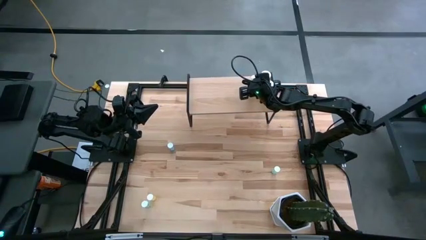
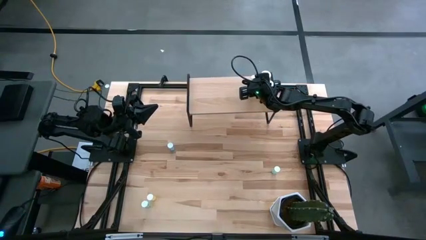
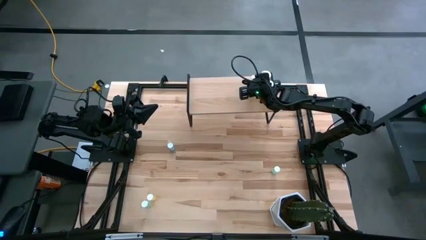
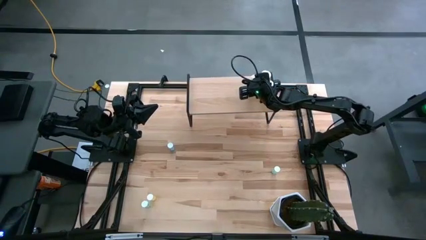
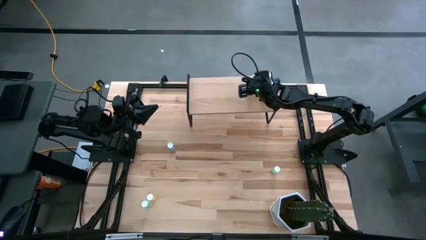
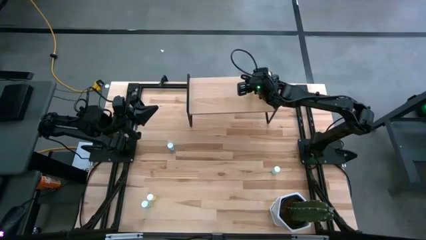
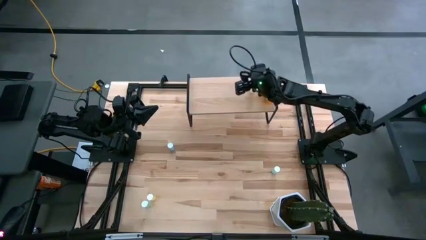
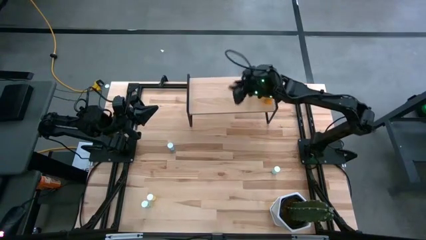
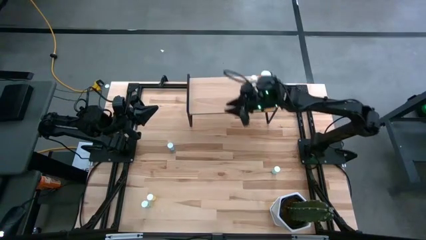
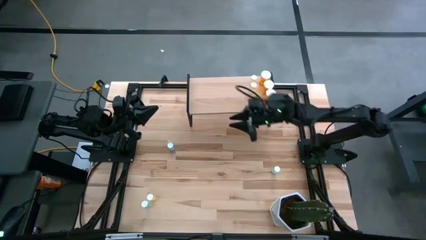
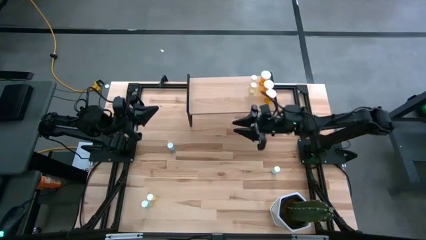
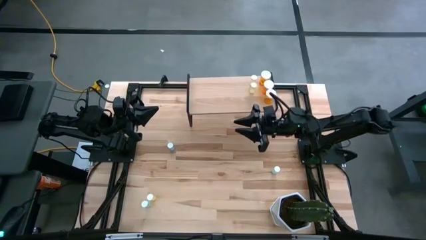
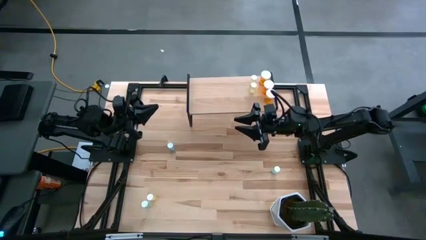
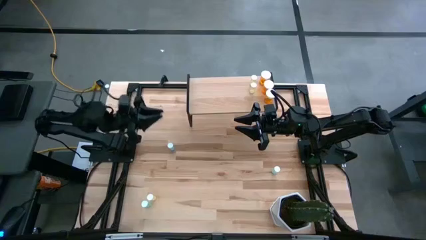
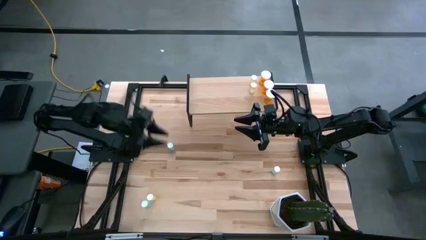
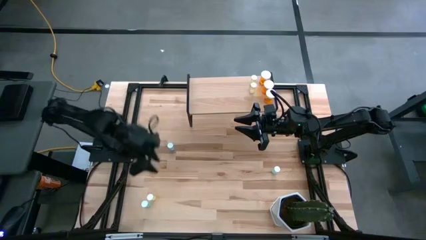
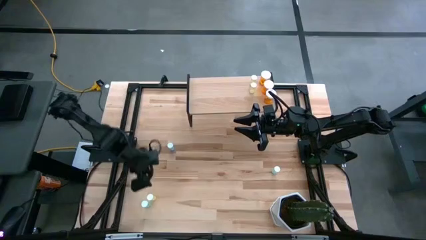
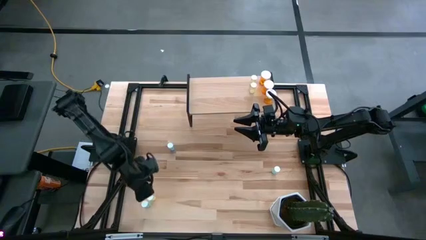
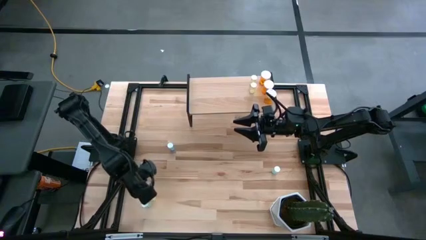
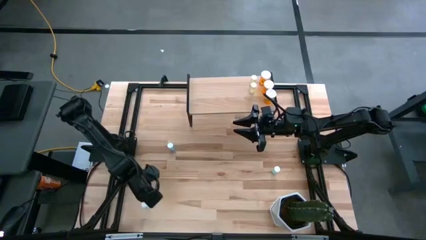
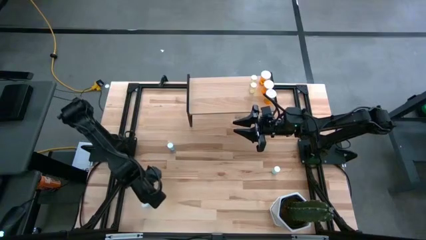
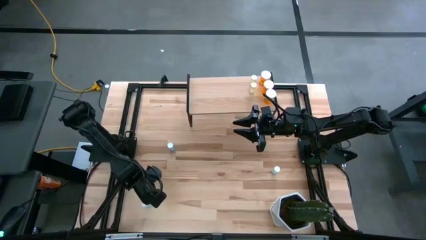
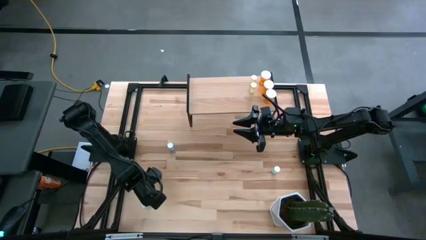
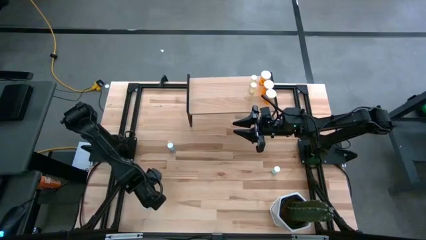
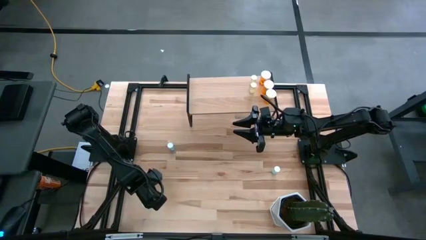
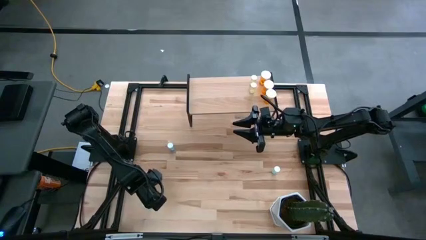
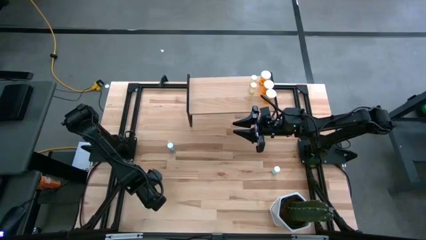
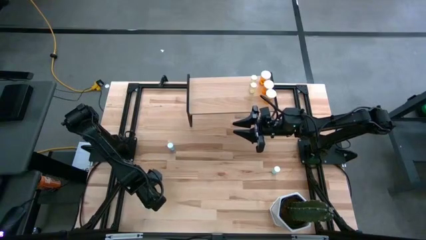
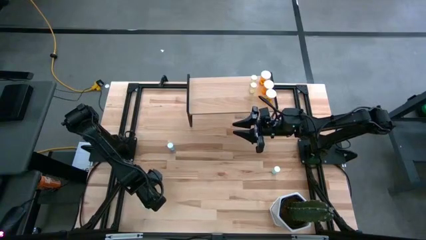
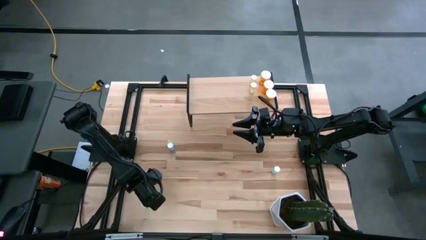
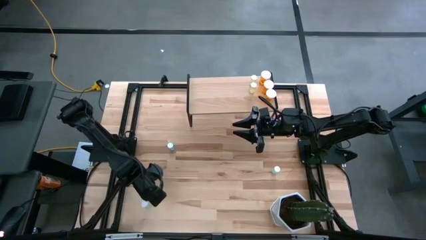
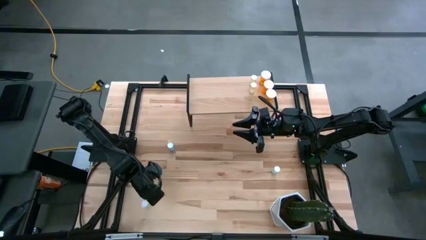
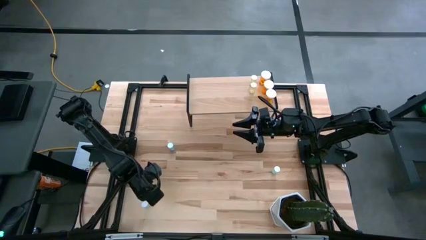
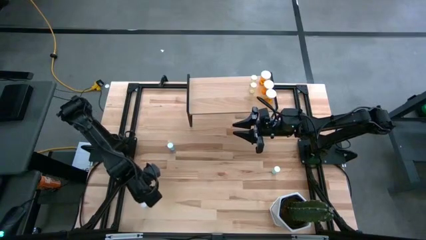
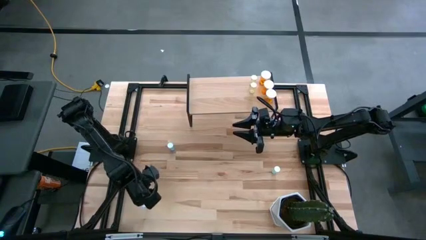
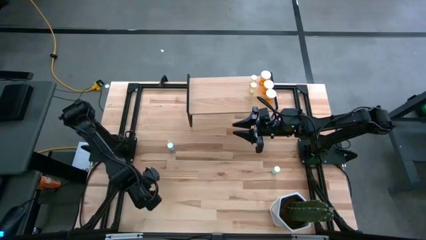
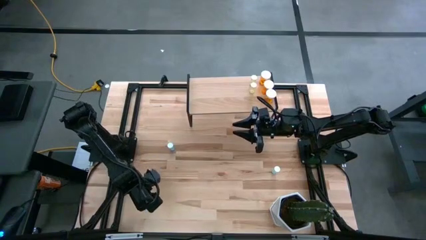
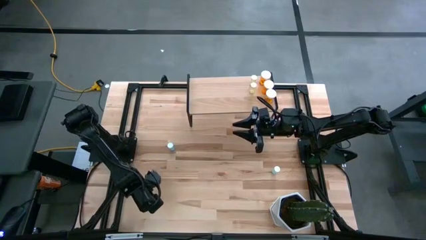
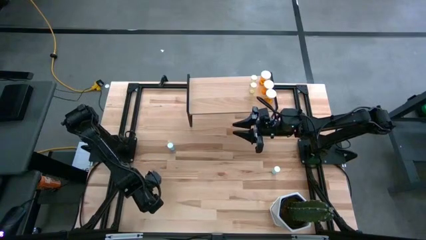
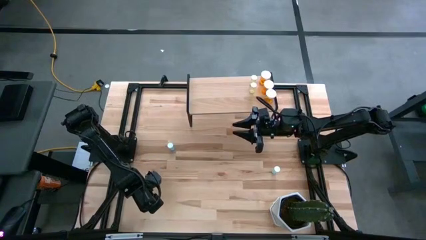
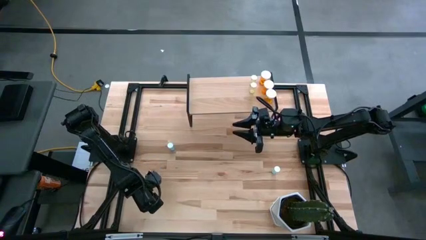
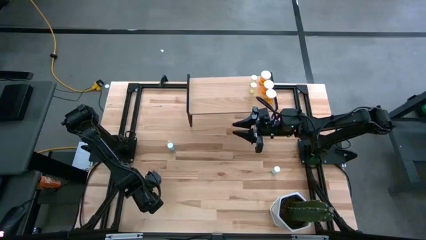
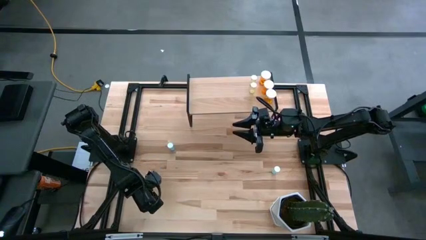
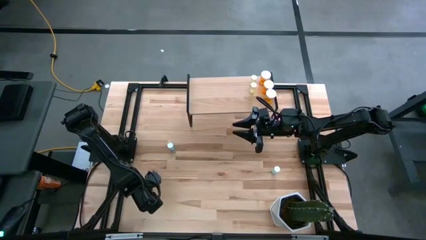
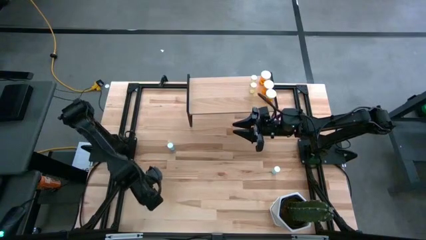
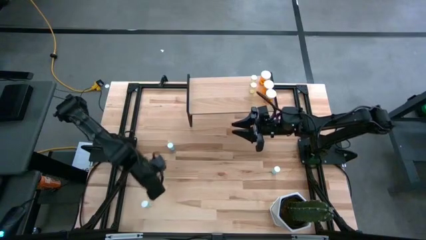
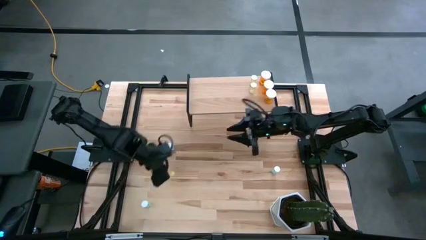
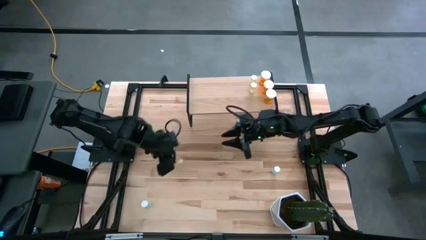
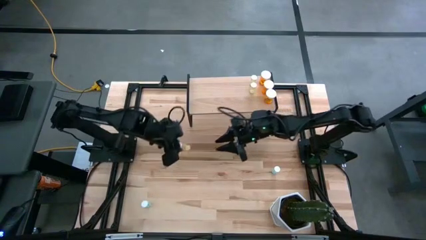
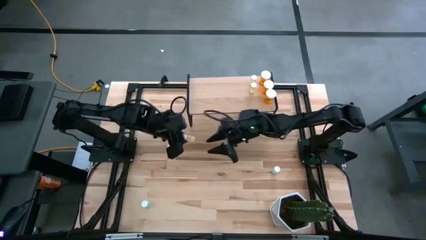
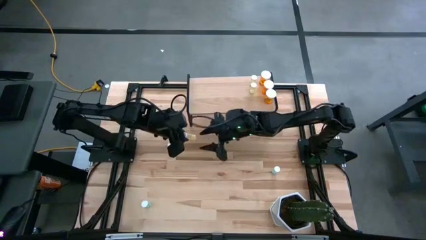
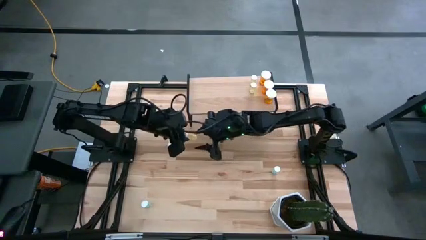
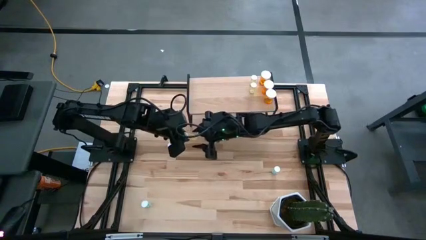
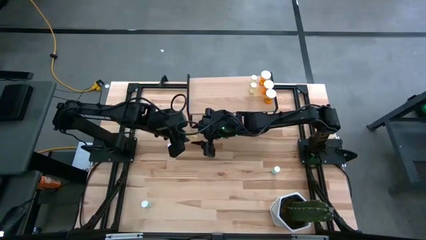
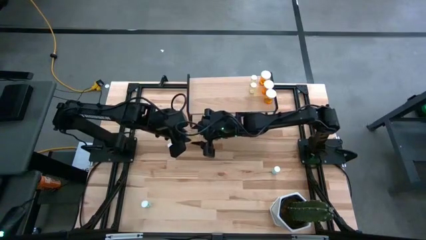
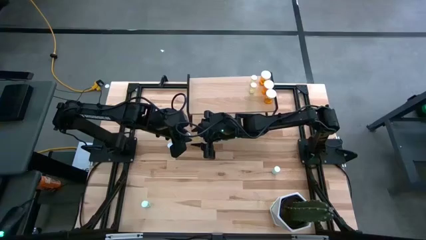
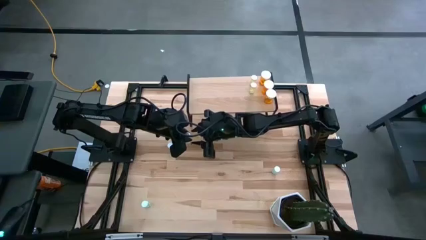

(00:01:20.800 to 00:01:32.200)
Task: Pick and place medicine bottles onto shelf by color
Put the yellow pill bottle on the shelf aligned with the yellow pill bottle
